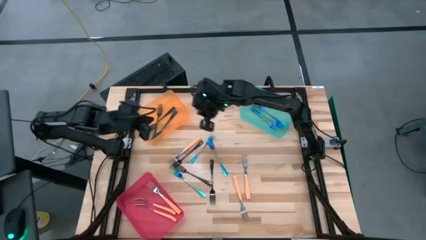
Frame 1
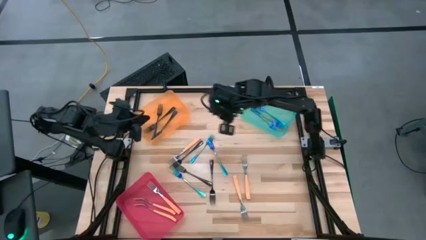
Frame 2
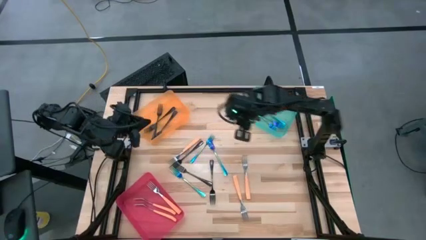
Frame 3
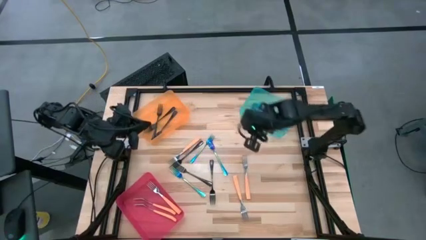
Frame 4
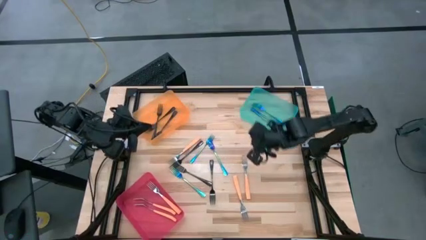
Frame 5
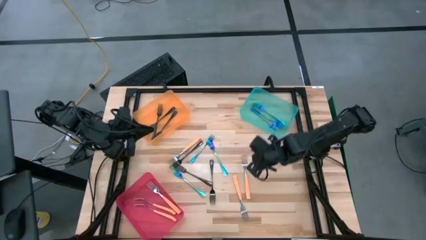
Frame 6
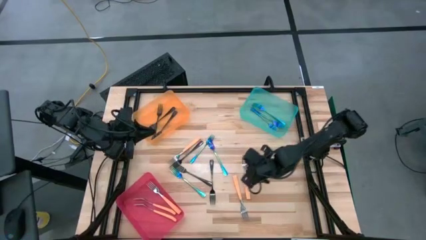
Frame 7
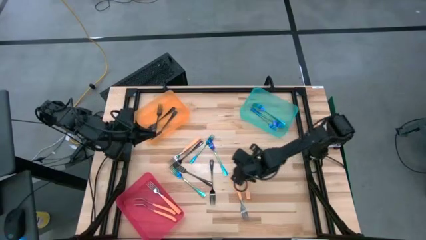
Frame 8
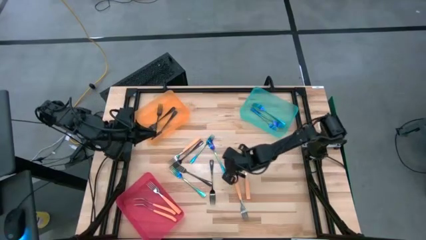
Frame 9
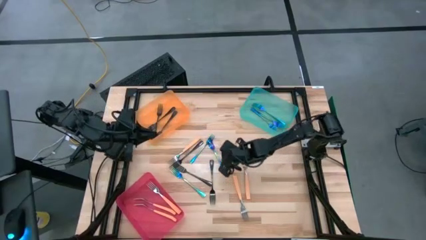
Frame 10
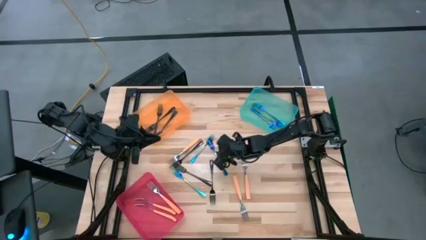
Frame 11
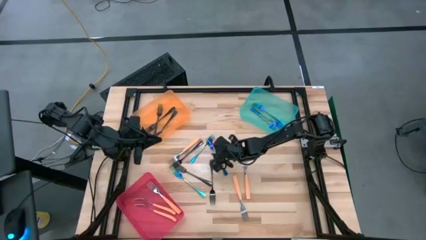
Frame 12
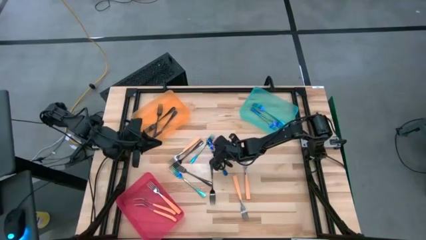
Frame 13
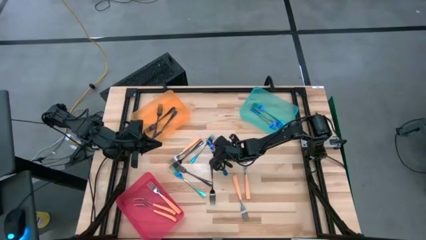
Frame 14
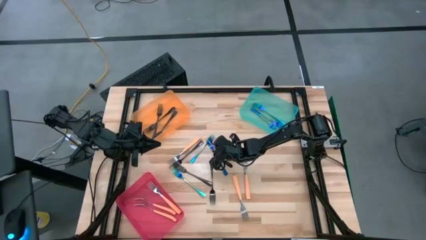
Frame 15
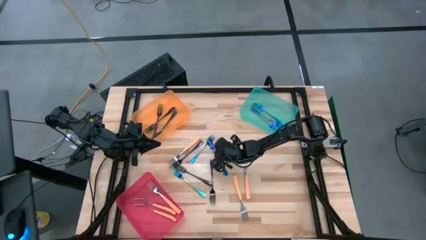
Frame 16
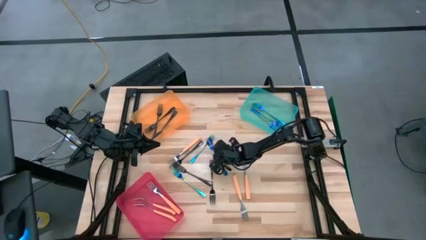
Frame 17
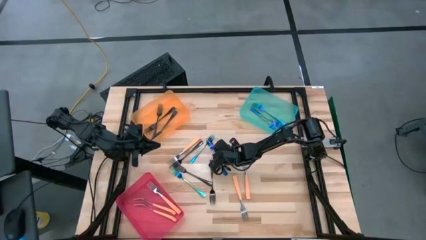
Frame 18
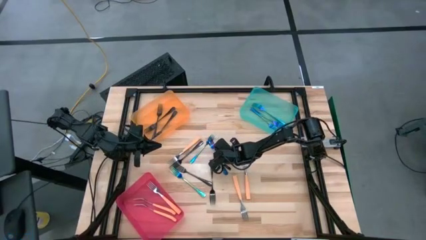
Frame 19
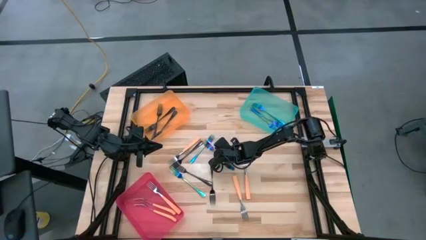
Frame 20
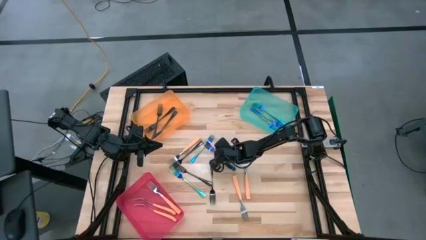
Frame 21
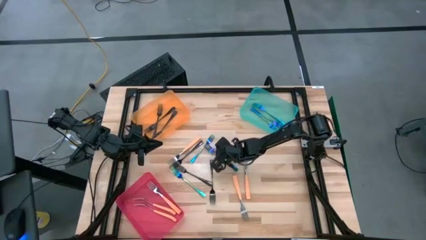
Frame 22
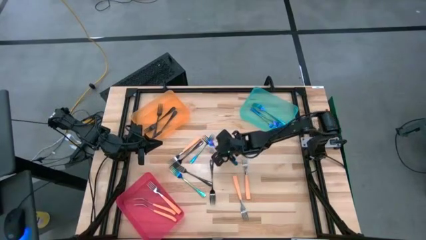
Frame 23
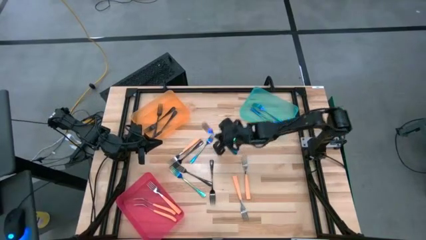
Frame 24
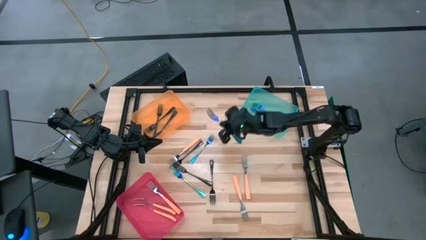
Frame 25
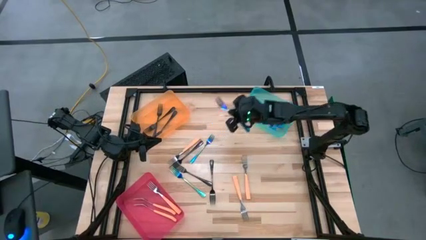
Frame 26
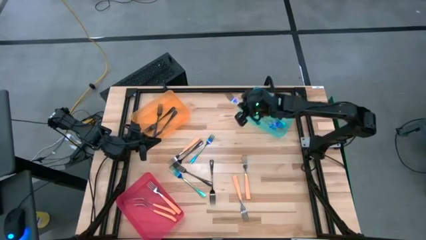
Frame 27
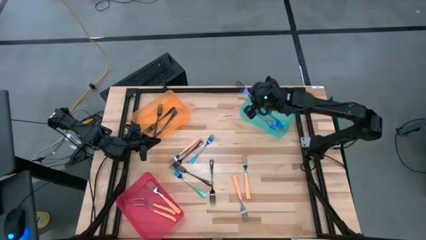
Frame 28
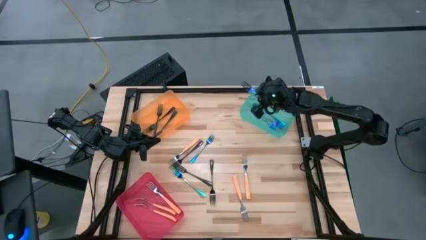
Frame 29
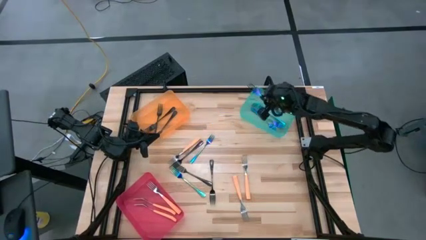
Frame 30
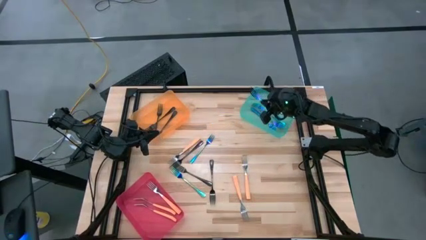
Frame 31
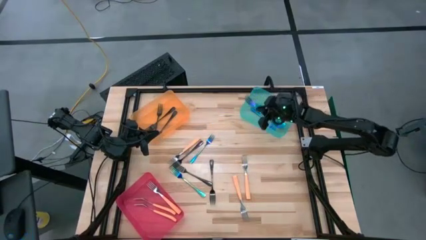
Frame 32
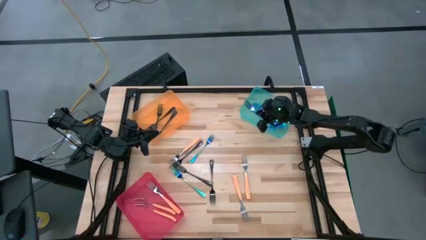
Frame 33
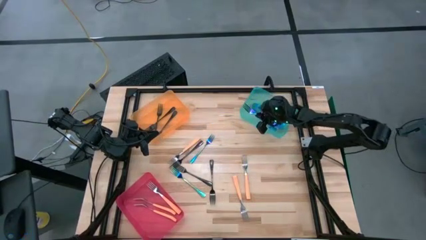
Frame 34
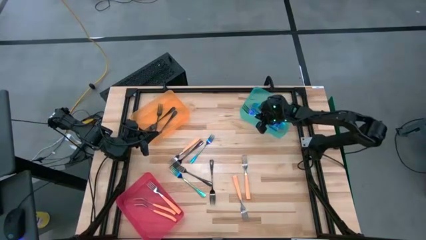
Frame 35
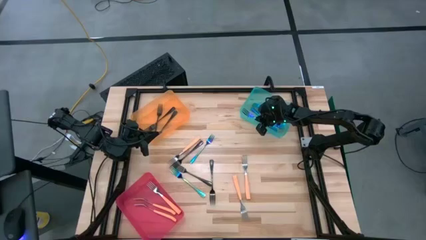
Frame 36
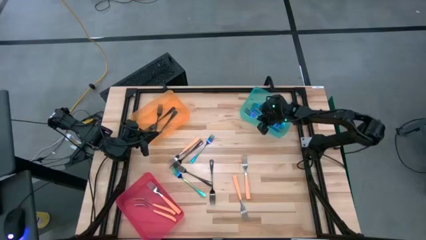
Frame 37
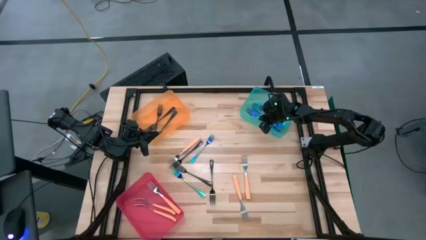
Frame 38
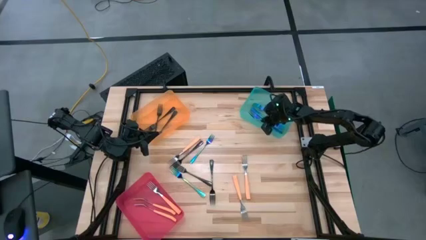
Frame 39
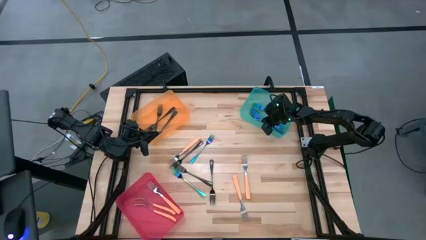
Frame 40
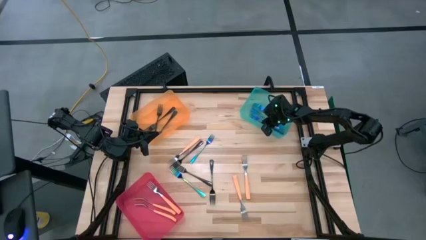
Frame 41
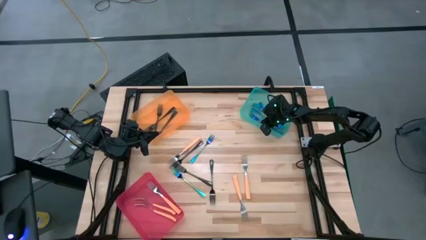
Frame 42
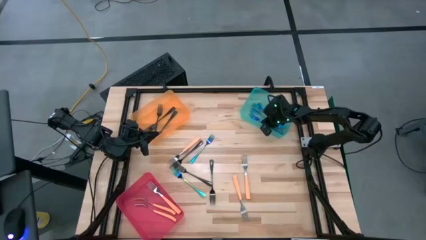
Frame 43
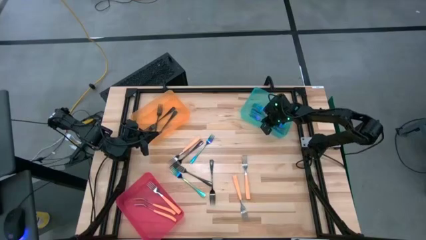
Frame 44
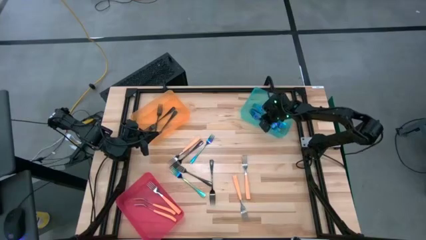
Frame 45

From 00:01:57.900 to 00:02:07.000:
Task: Sort silverware by color (type)
Put the iridescent fork into the green bin

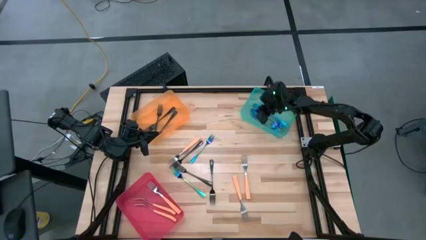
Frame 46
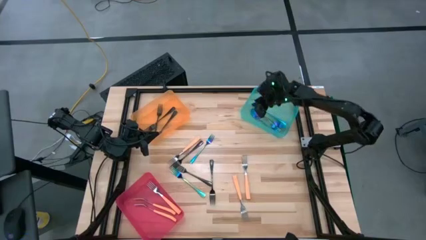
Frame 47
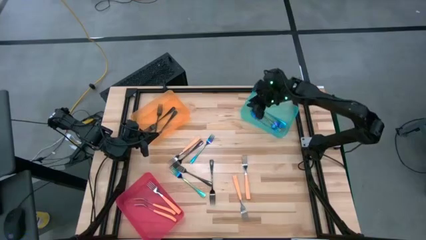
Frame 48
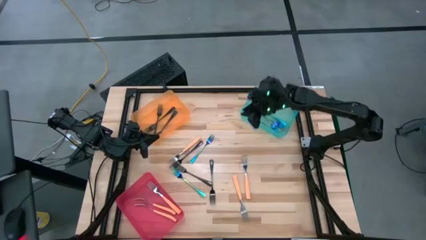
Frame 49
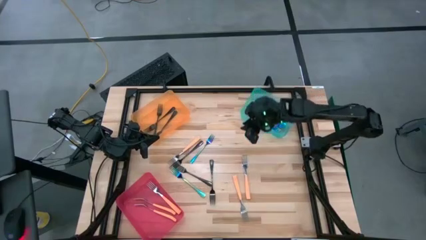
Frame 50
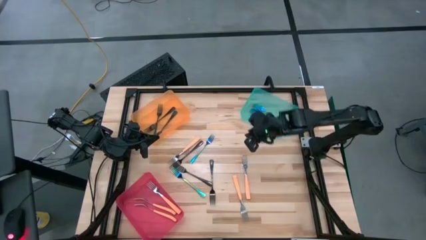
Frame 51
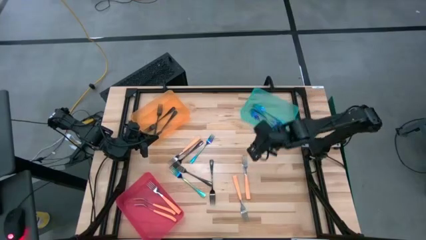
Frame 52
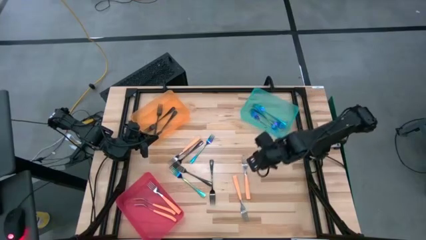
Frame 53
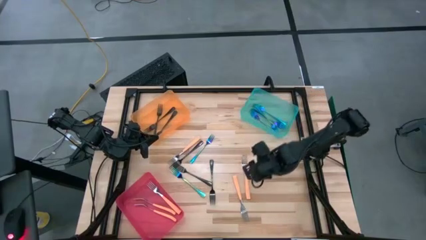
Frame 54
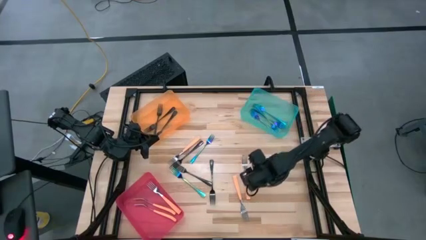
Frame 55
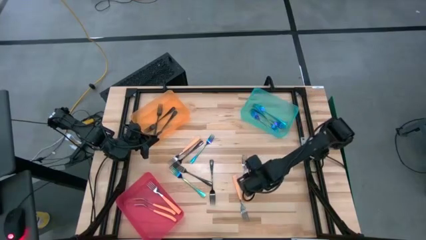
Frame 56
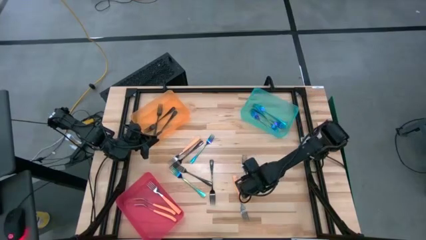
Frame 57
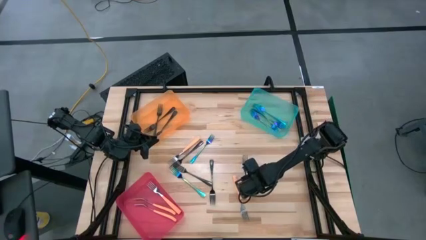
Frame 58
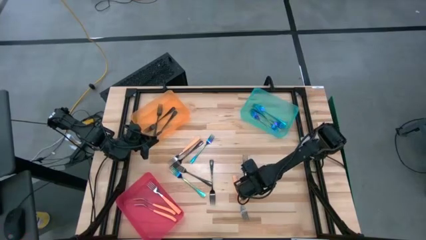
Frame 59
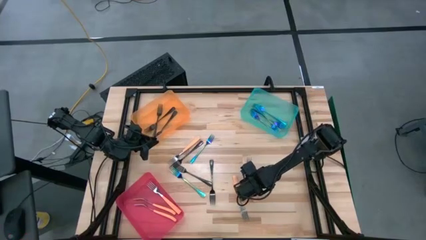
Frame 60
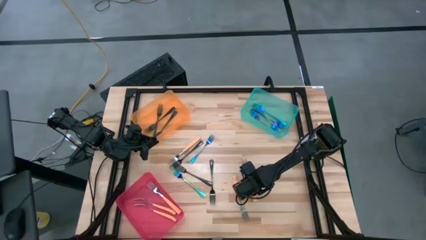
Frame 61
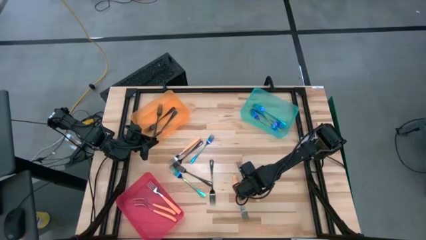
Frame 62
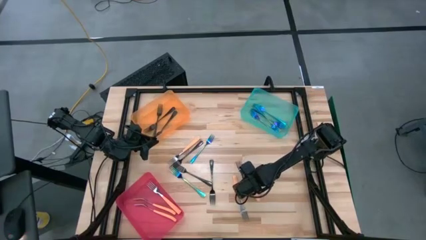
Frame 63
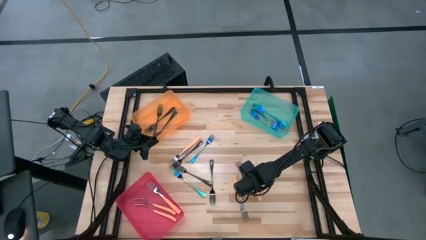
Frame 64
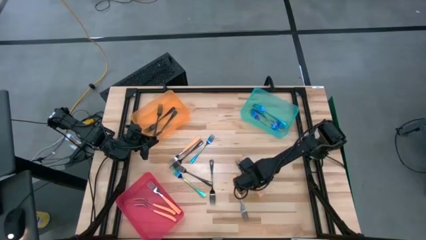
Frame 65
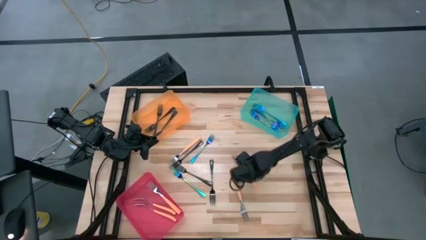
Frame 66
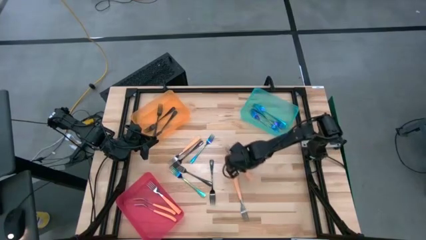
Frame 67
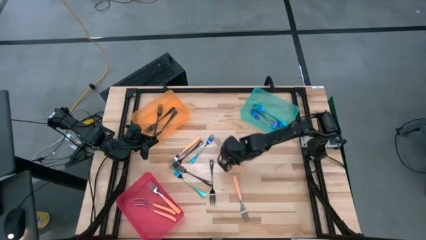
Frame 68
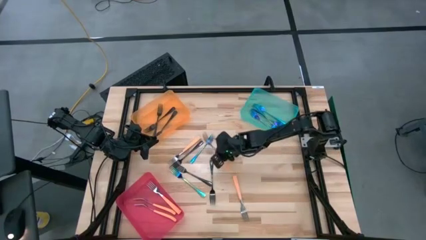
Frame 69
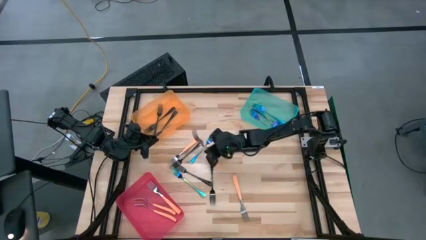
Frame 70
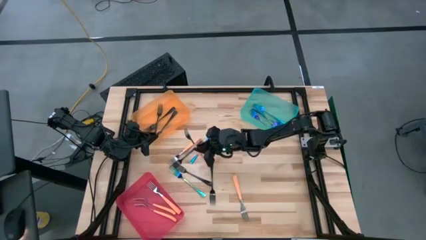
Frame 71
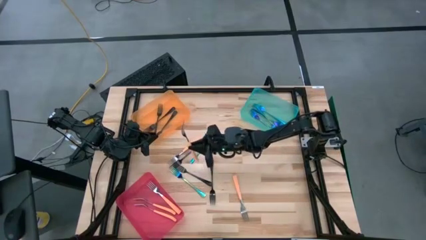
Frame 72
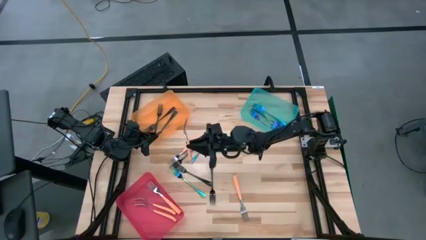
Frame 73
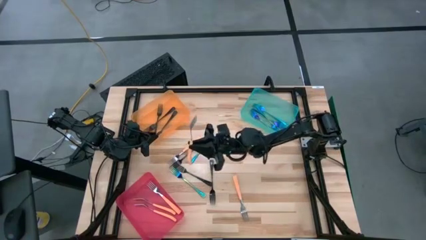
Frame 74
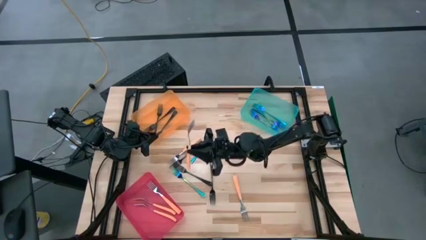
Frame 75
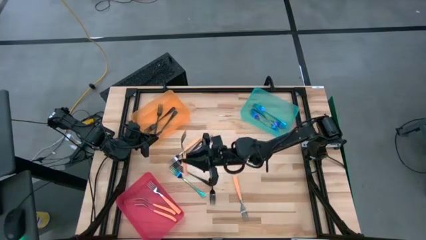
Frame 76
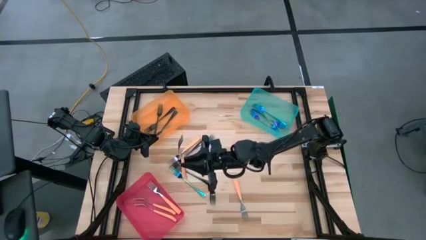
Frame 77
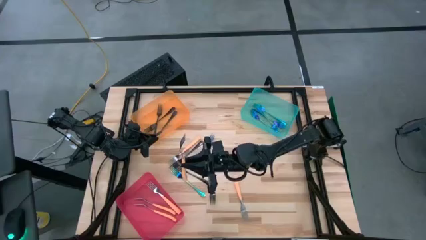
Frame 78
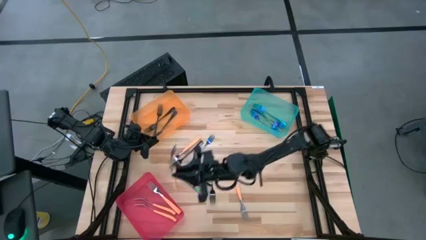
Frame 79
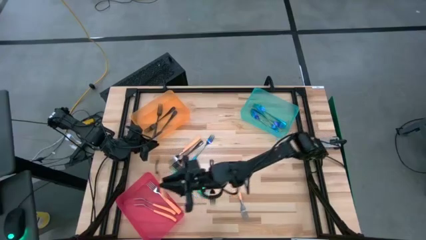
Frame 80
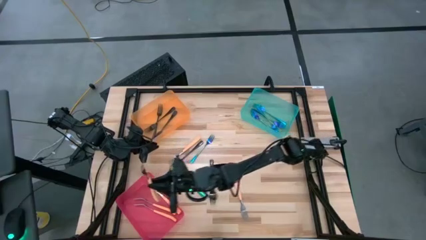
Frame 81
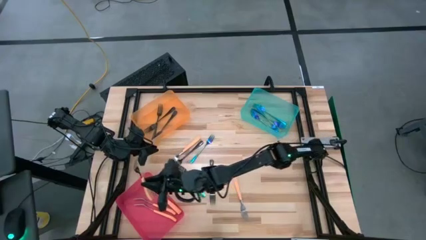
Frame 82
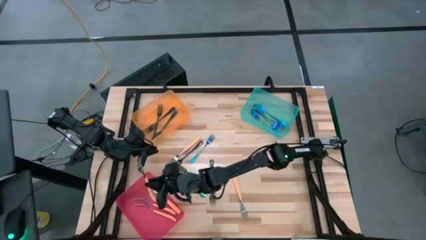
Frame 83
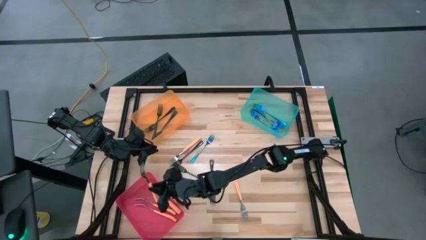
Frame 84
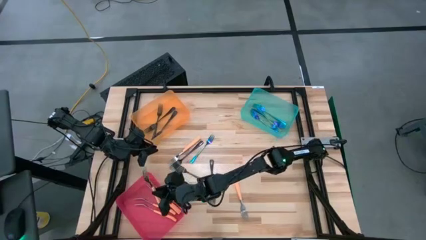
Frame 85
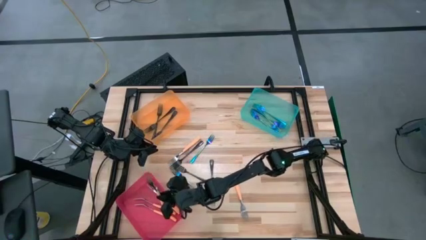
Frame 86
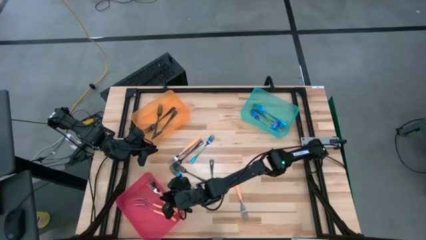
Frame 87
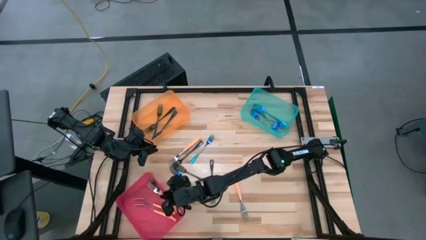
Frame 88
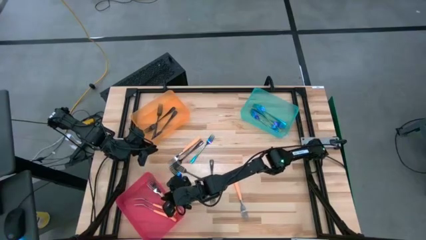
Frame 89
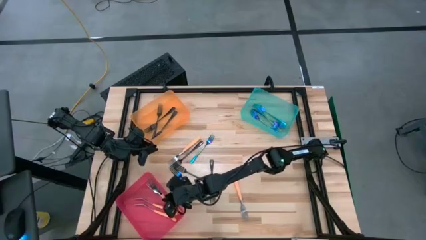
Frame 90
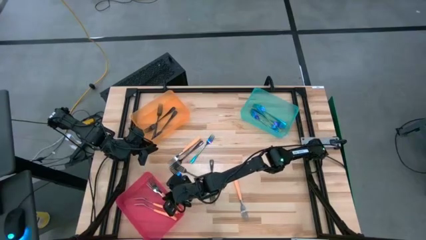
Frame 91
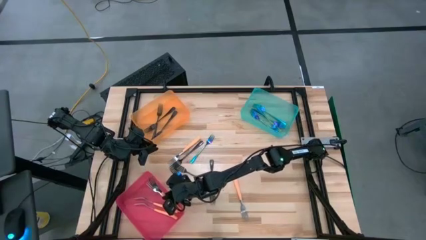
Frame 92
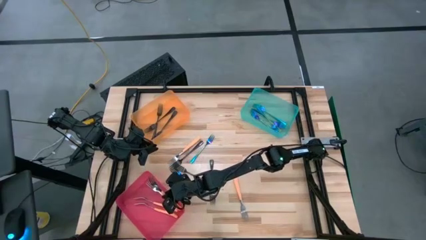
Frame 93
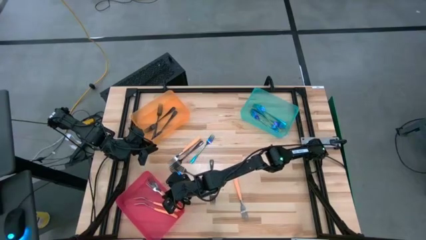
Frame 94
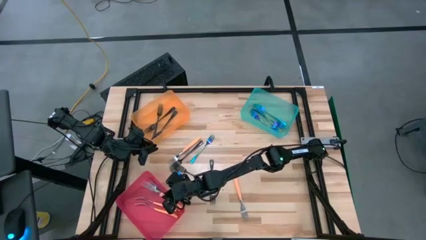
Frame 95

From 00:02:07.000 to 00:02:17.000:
Put the orange fork into the pink bin
